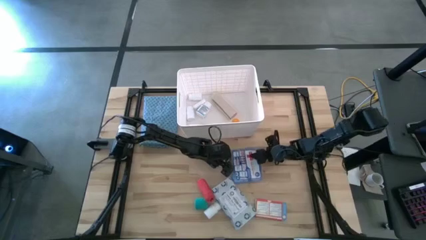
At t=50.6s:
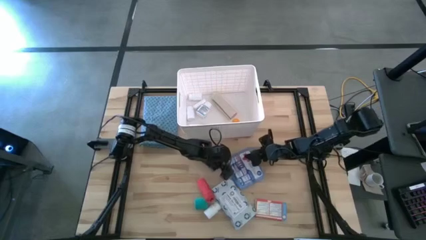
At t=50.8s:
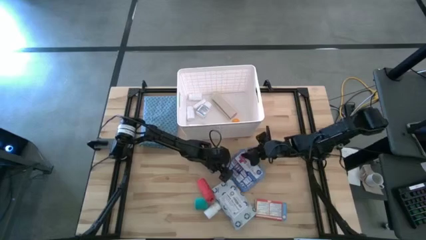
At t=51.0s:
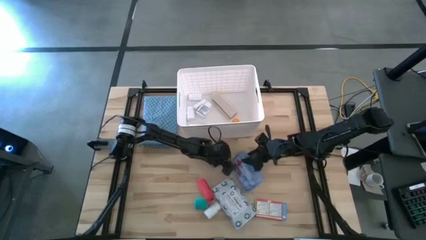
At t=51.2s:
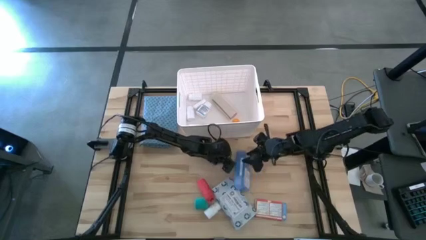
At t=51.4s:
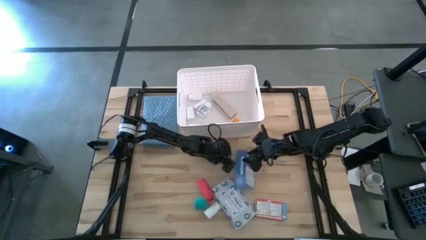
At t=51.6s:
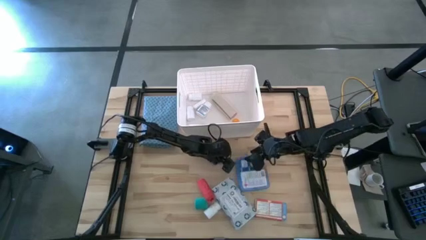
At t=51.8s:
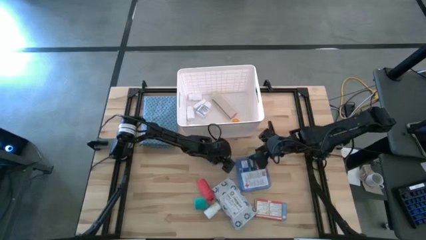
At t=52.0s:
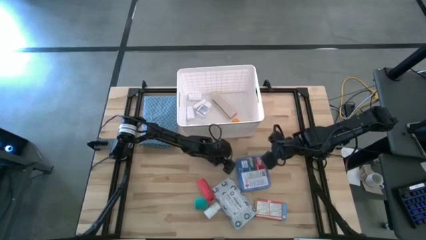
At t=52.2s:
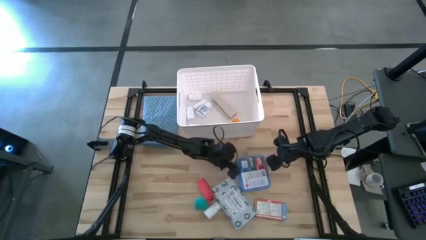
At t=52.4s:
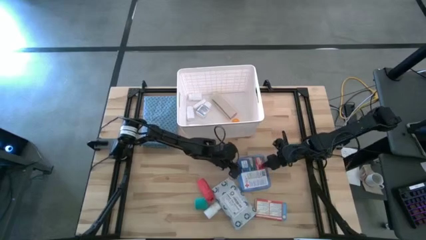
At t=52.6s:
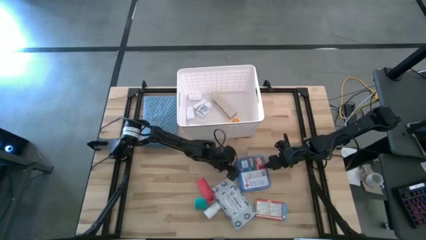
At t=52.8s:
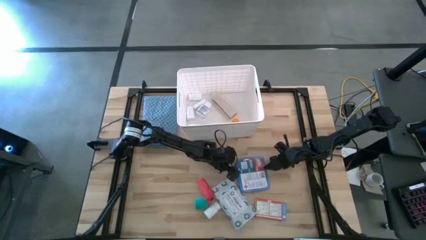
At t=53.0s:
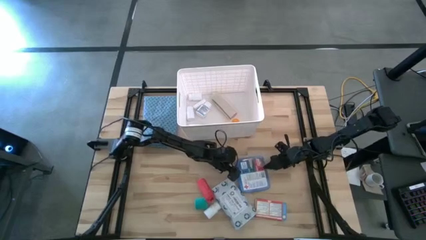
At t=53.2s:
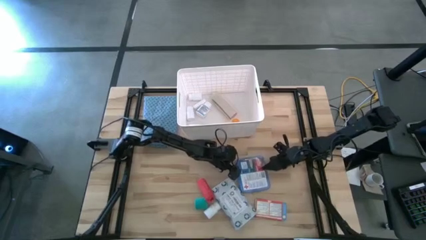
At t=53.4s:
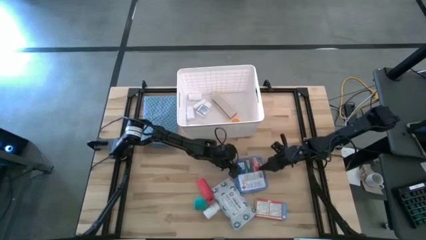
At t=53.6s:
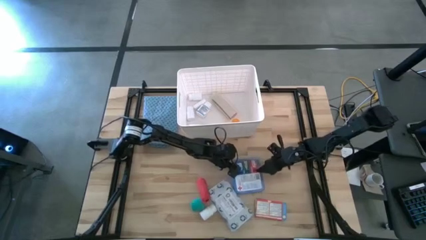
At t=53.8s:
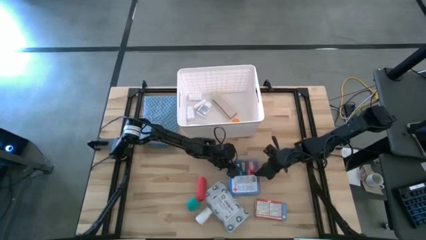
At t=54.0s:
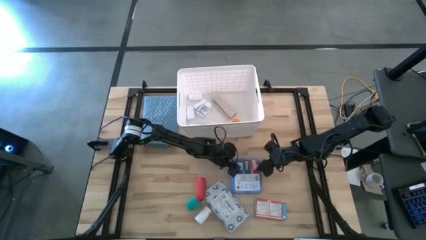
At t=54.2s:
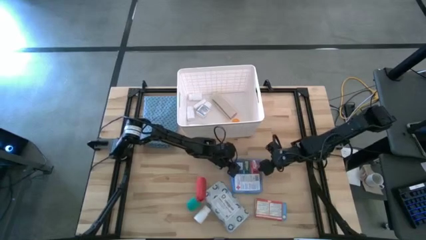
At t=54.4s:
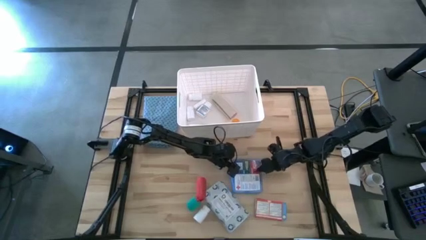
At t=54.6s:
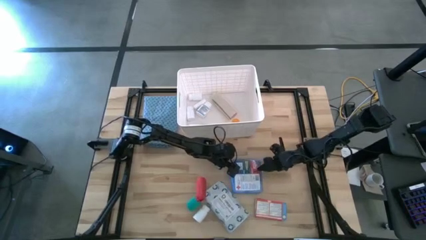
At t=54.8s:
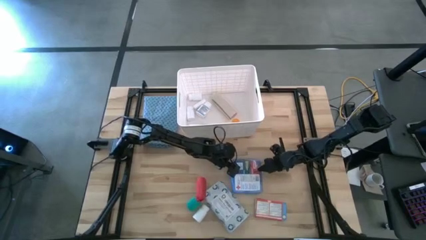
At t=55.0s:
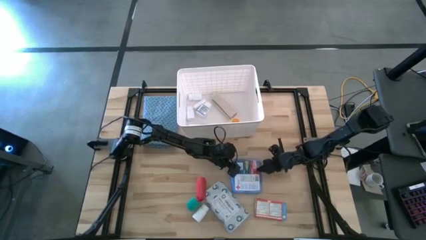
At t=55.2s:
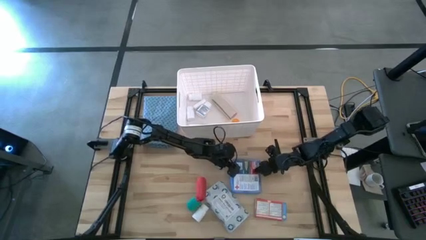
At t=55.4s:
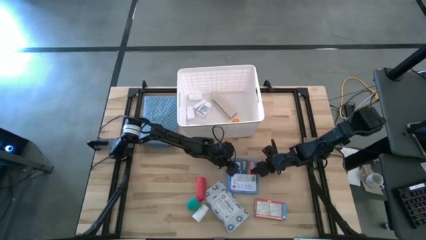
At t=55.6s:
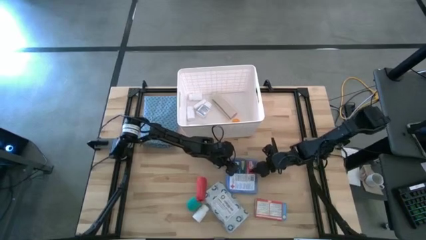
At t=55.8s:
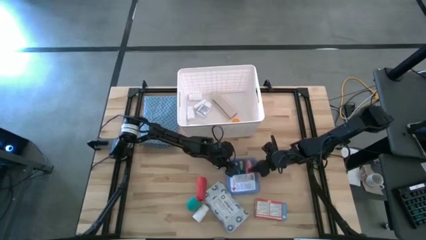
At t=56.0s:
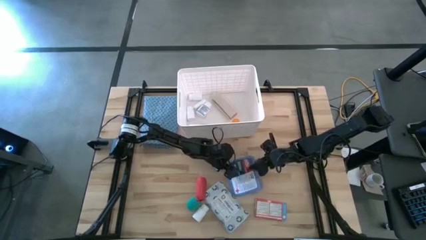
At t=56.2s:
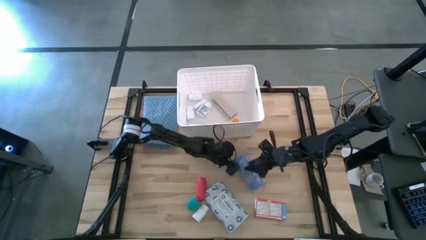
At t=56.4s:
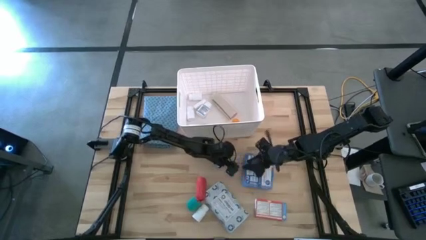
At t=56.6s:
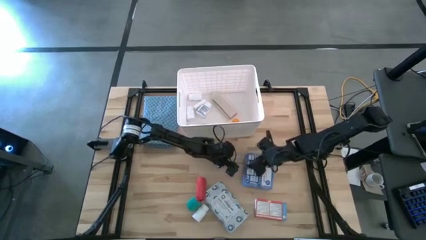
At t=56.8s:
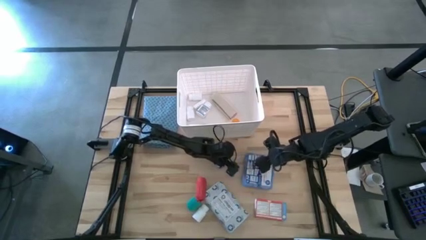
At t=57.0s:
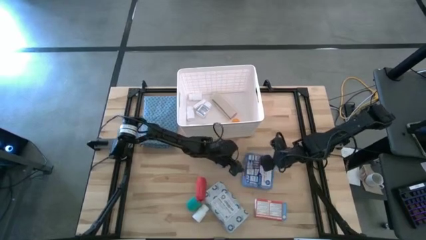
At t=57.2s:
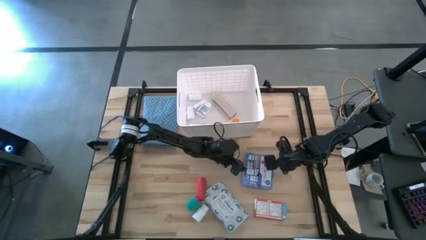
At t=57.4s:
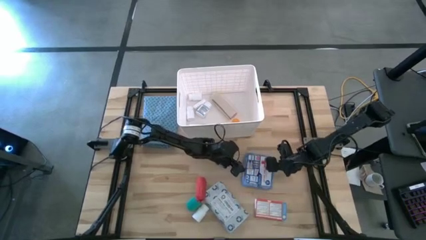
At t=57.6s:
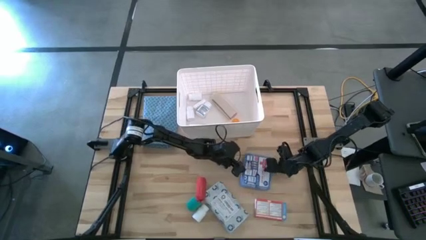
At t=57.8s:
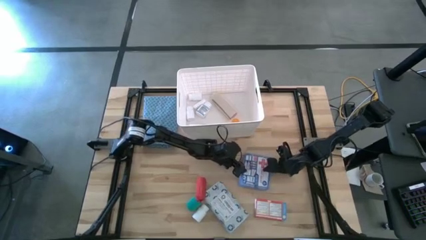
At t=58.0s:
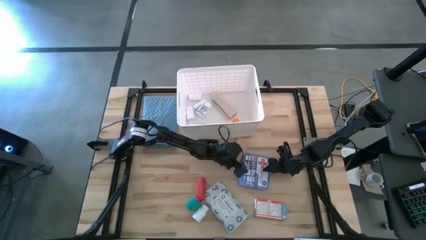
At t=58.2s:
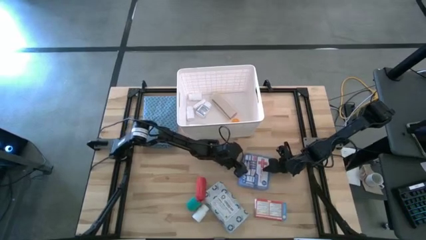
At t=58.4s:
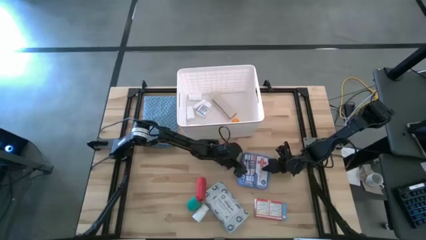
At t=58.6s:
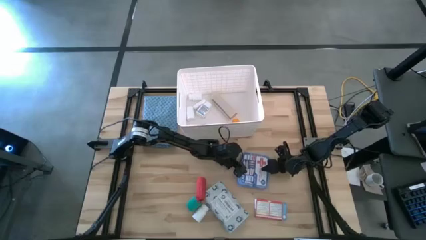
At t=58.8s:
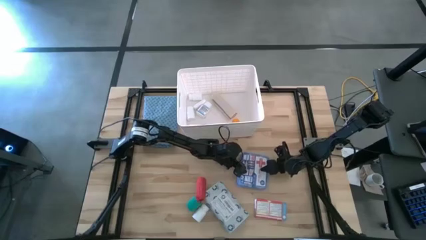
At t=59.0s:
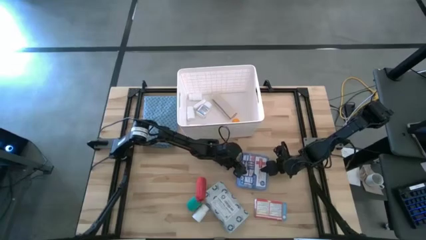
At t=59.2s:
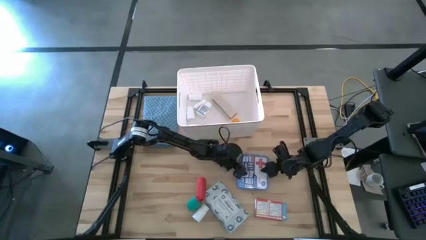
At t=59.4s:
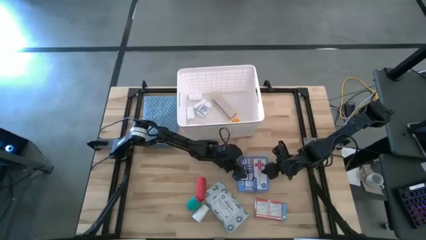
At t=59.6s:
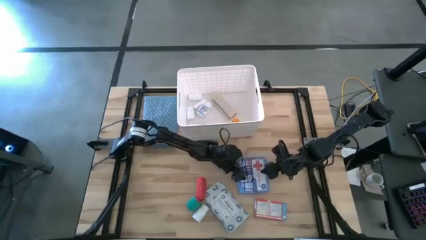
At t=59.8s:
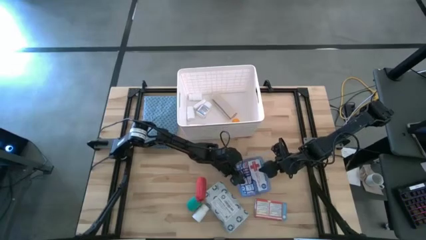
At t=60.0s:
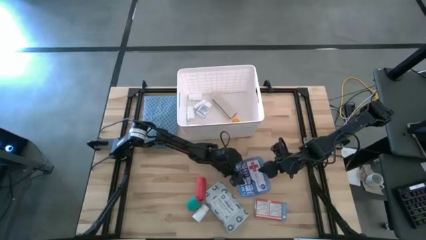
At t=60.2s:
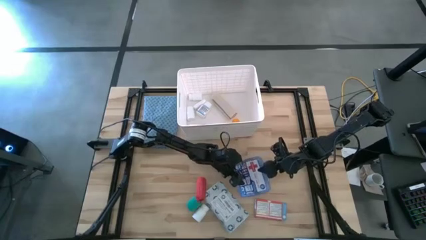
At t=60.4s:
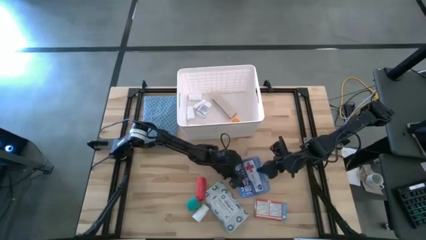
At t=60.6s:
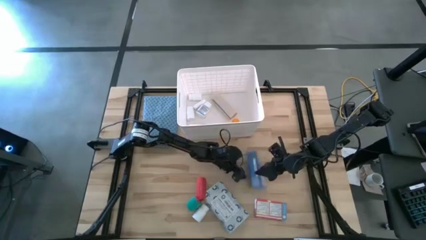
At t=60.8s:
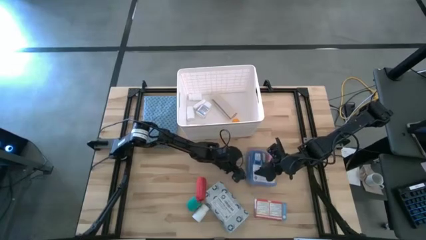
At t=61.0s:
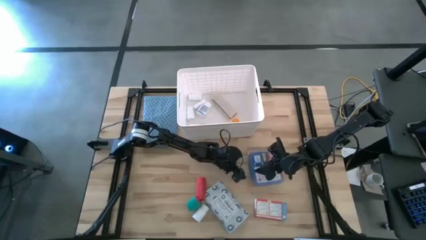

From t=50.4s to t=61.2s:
Task: Pick & place medical supplies in basket/bin
Put the blue first aid kit into the white container

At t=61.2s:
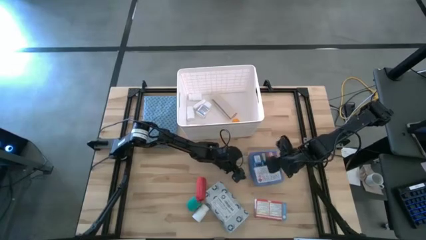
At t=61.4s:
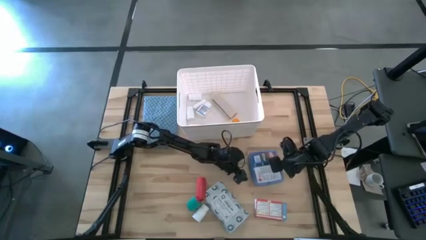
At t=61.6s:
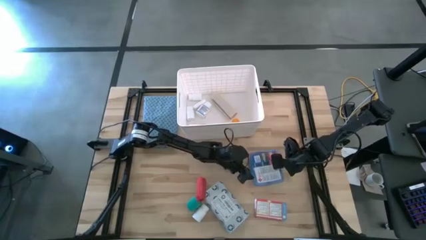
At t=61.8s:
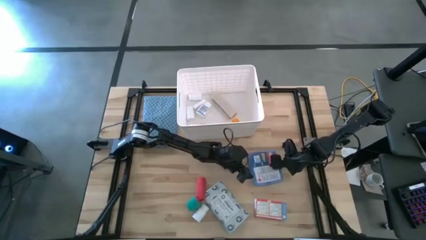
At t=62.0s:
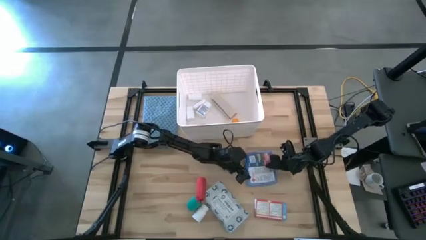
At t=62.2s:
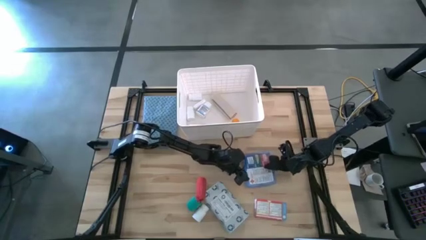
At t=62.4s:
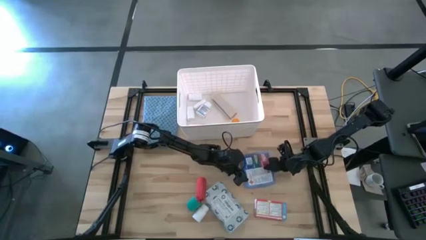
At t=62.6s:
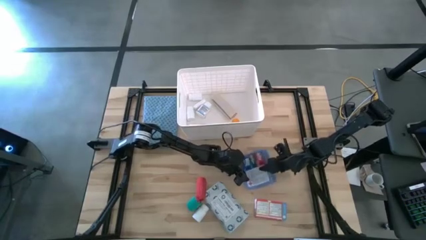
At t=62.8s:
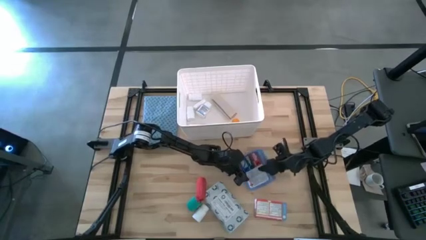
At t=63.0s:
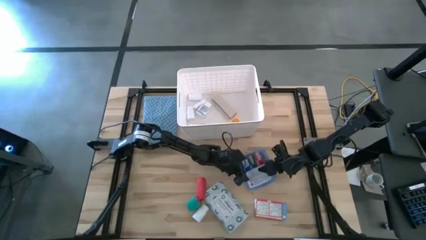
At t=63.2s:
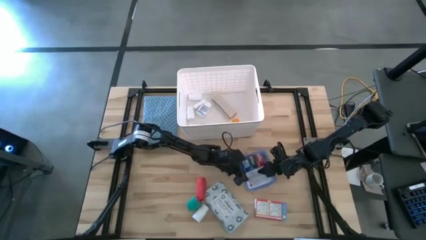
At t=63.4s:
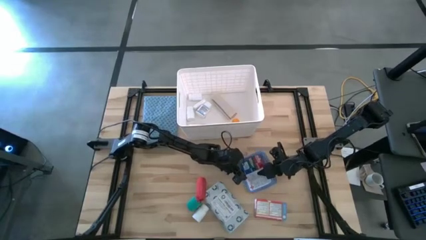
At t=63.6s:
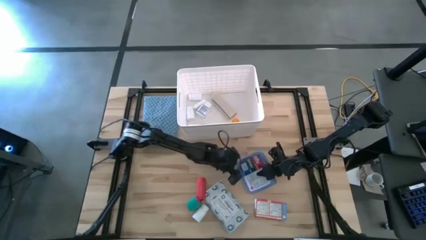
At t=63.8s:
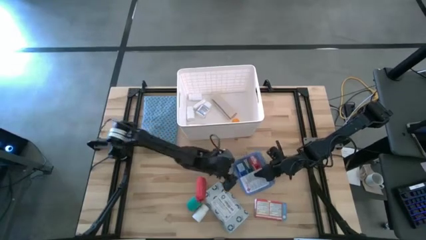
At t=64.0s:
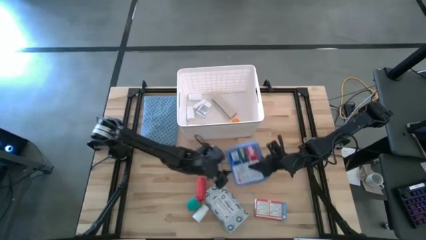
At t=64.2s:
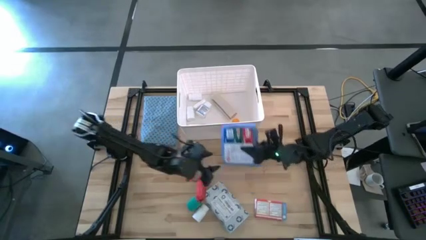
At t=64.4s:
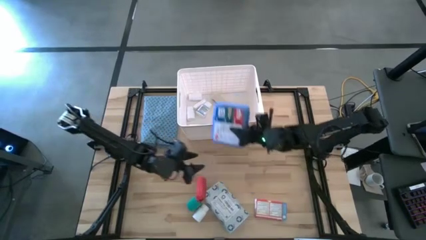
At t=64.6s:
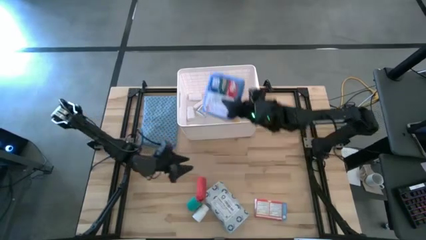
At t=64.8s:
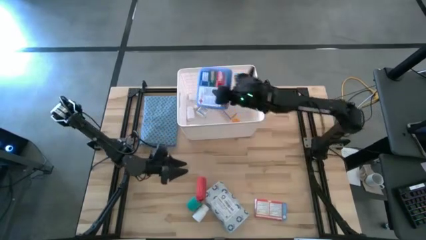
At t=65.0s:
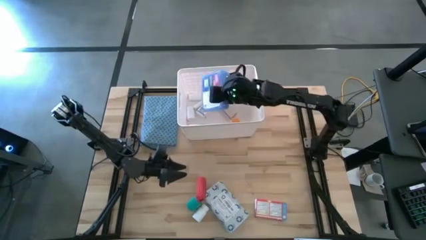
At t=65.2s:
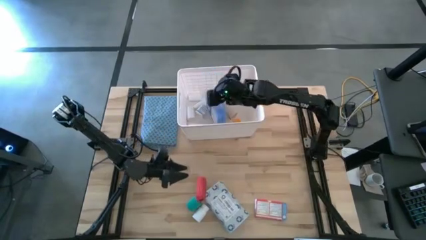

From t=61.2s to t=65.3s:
Put the blue first aid kit into the white container

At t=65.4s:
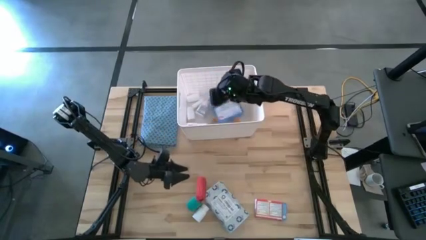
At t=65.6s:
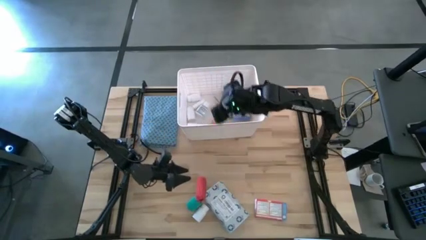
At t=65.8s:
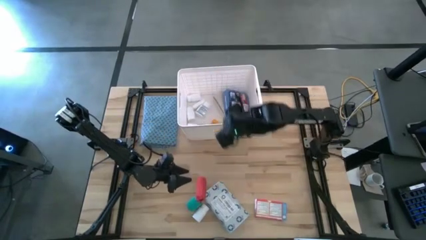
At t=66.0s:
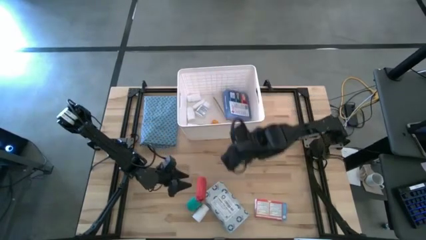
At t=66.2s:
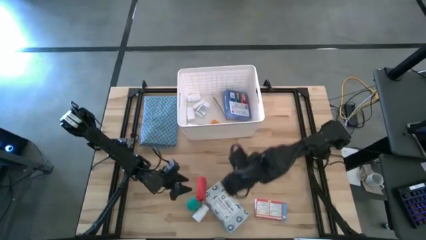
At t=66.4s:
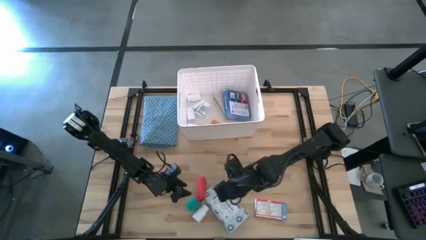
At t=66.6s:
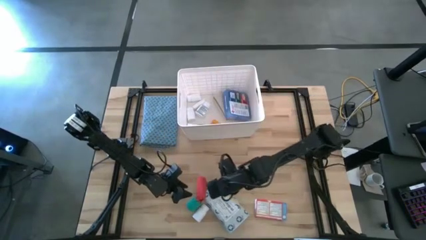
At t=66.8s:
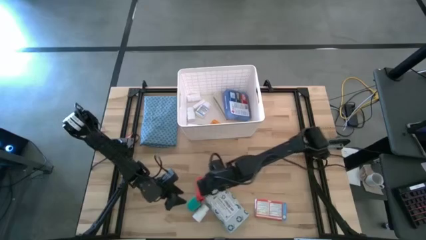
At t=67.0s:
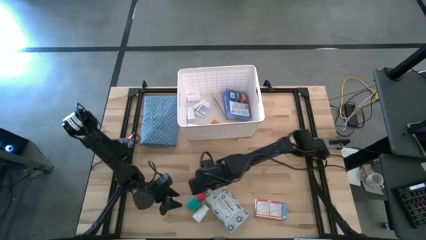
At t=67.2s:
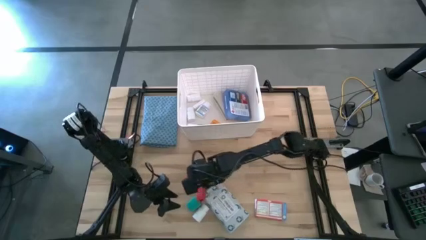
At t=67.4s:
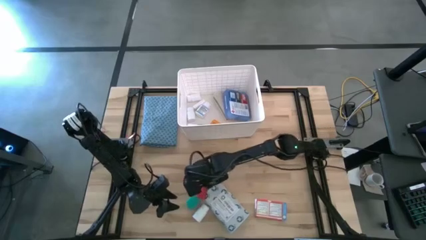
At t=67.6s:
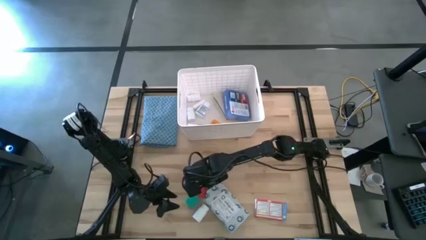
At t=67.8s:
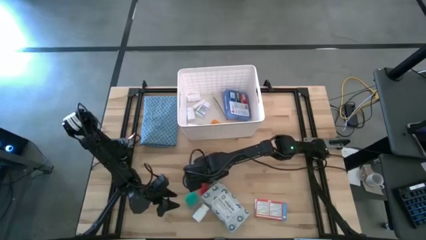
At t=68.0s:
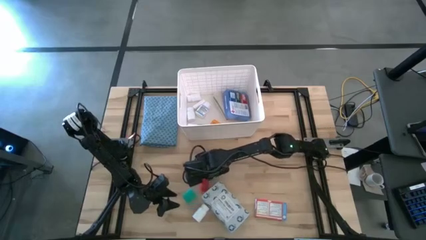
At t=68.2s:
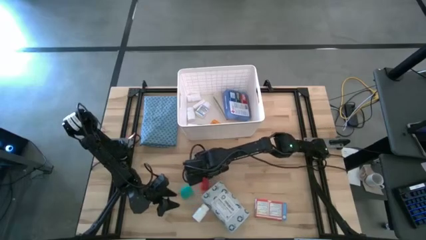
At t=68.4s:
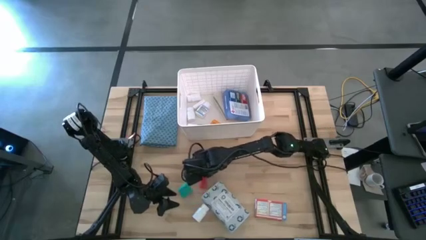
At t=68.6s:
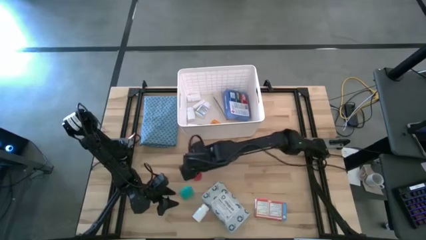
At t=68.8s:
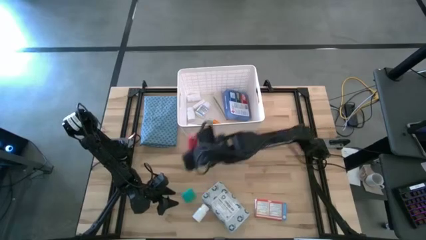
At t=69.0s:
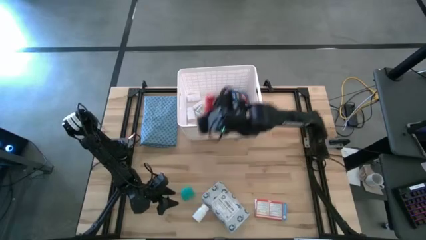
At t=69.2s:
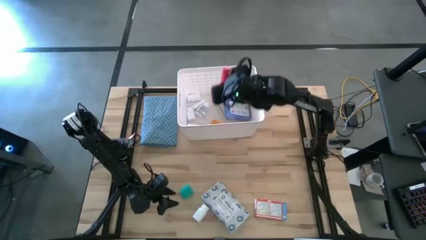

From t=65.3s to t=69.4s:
Put the rolled red bandage into the white container
